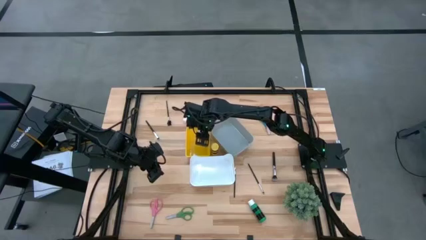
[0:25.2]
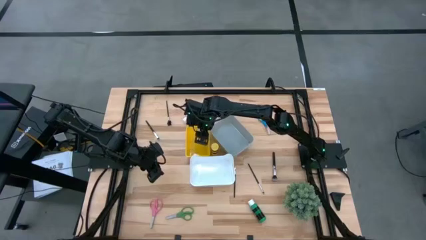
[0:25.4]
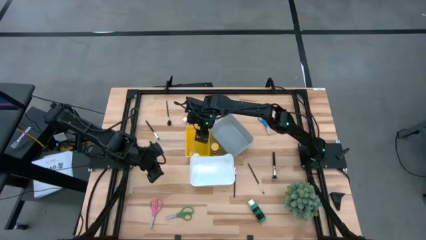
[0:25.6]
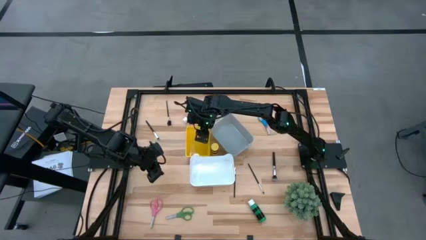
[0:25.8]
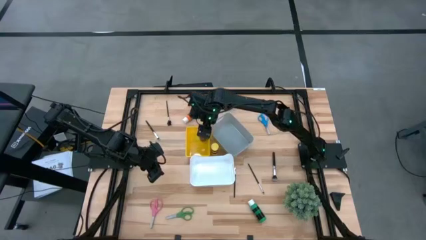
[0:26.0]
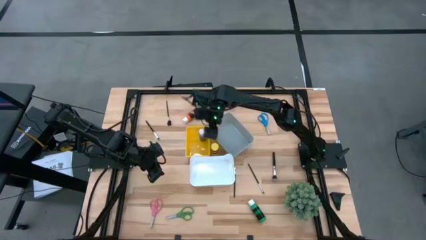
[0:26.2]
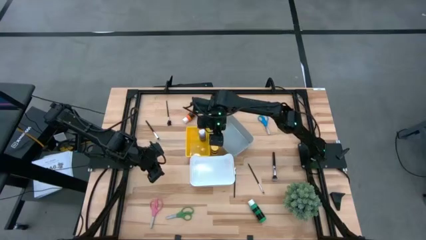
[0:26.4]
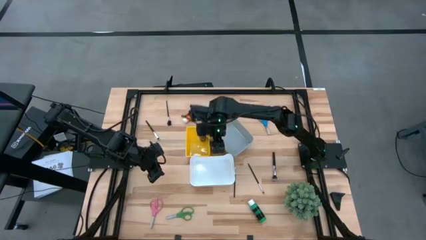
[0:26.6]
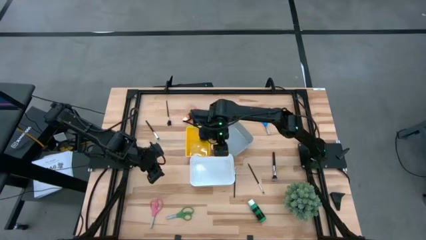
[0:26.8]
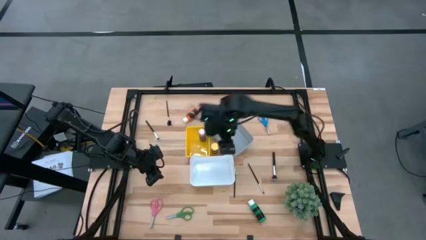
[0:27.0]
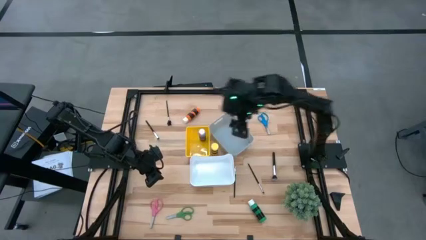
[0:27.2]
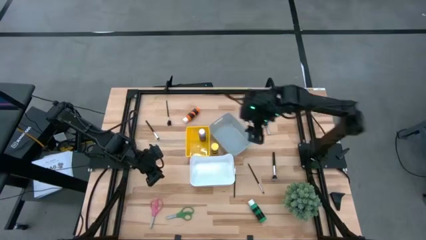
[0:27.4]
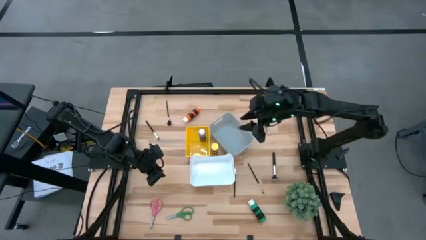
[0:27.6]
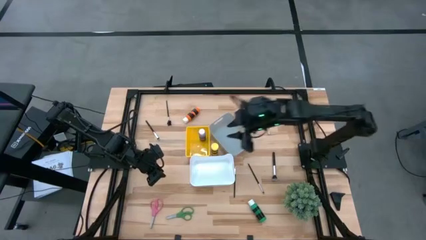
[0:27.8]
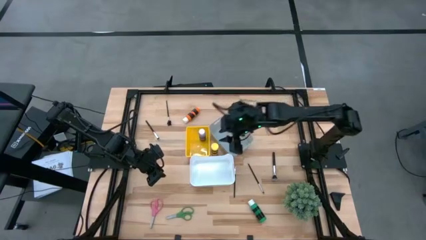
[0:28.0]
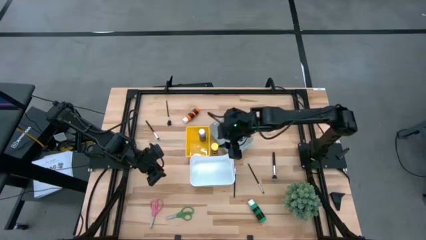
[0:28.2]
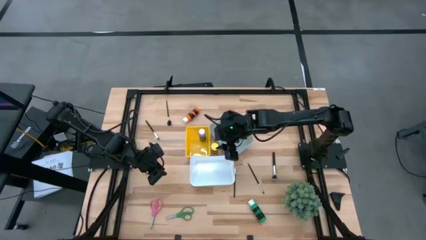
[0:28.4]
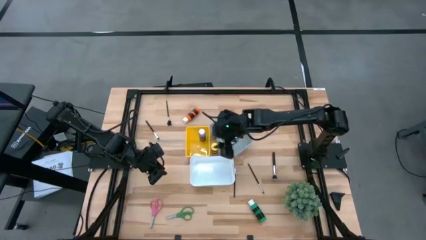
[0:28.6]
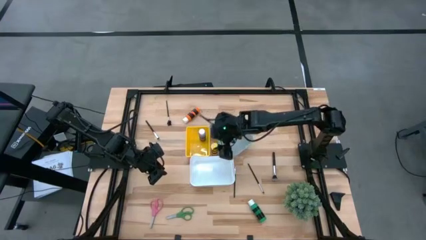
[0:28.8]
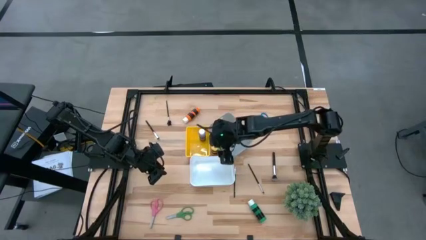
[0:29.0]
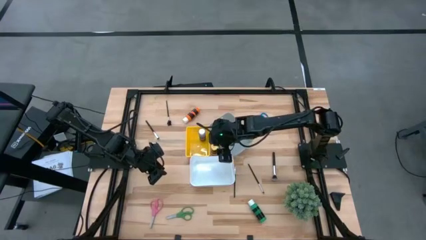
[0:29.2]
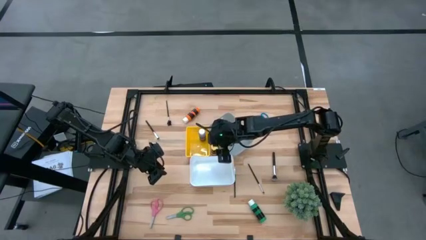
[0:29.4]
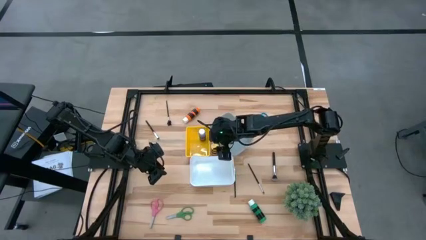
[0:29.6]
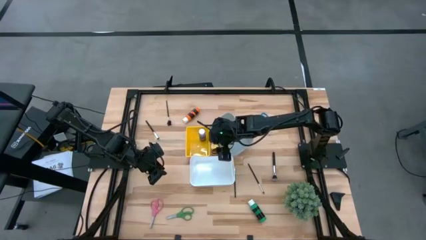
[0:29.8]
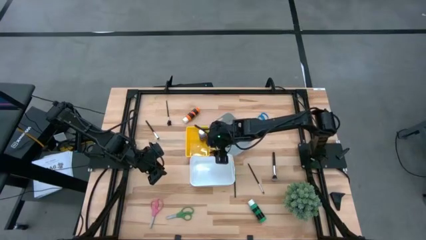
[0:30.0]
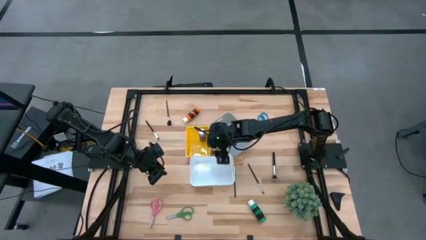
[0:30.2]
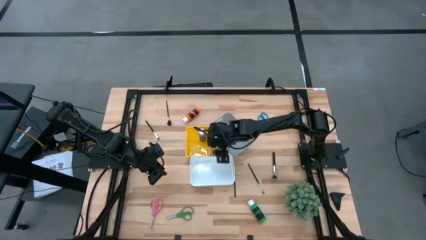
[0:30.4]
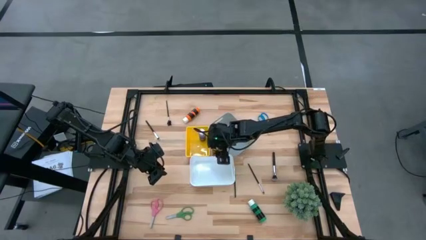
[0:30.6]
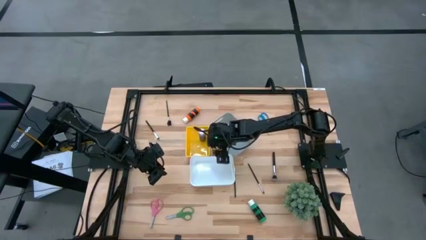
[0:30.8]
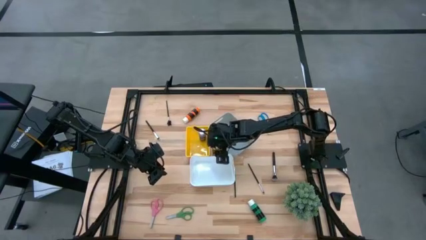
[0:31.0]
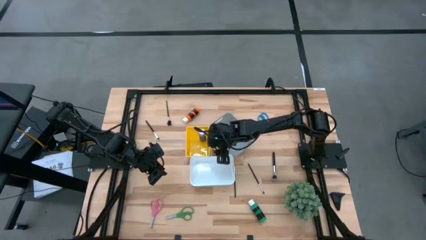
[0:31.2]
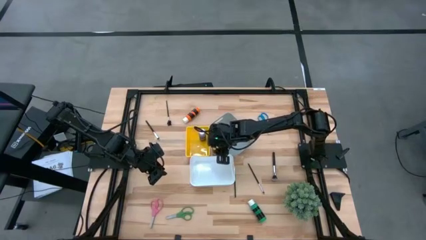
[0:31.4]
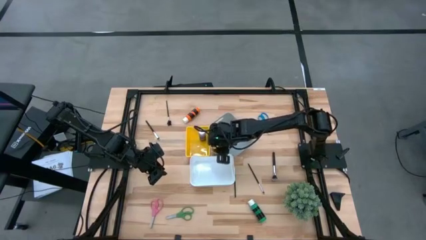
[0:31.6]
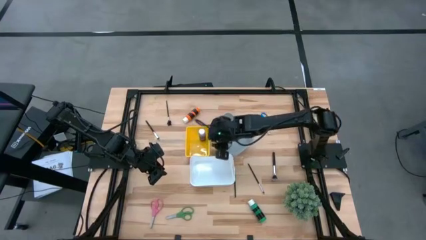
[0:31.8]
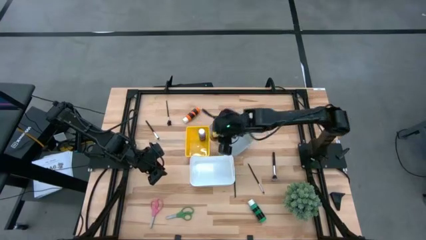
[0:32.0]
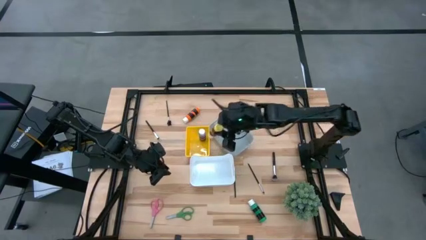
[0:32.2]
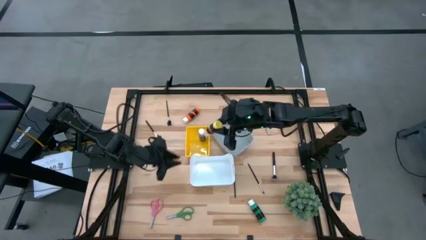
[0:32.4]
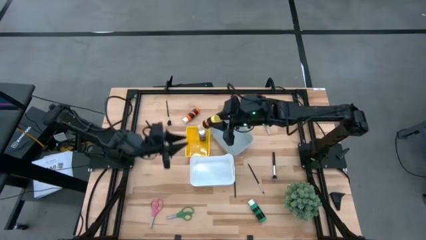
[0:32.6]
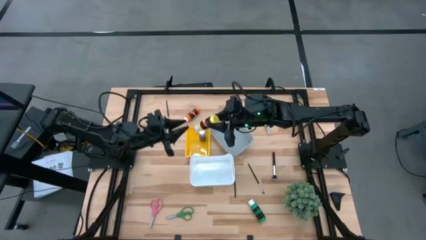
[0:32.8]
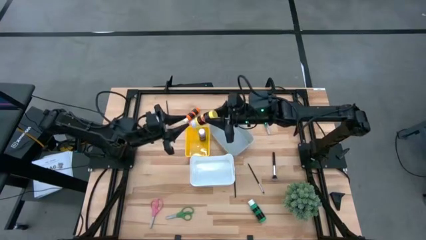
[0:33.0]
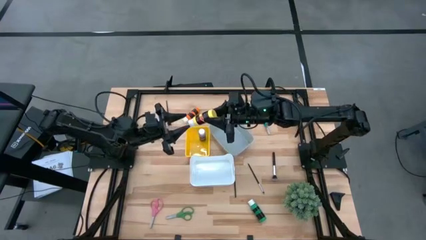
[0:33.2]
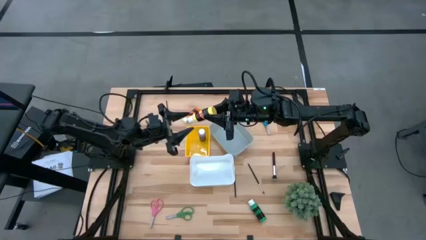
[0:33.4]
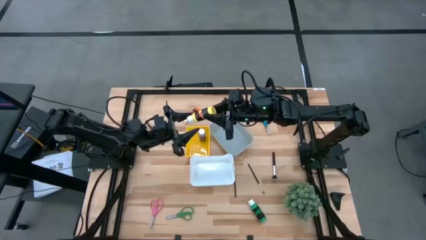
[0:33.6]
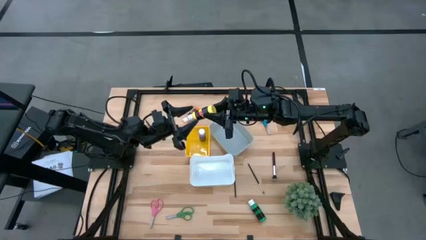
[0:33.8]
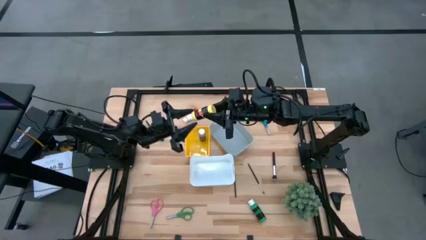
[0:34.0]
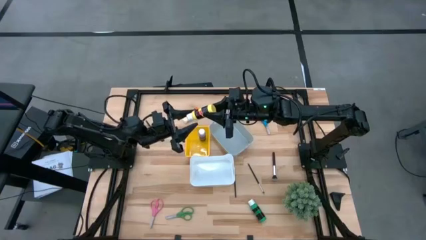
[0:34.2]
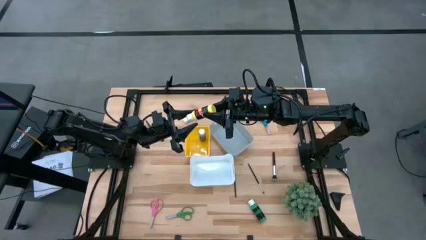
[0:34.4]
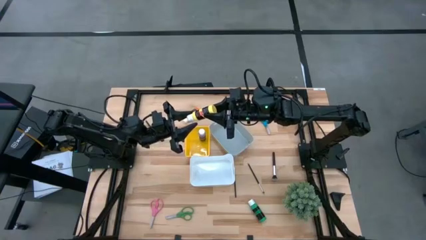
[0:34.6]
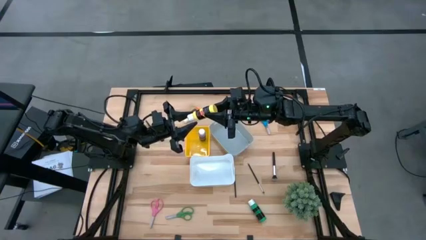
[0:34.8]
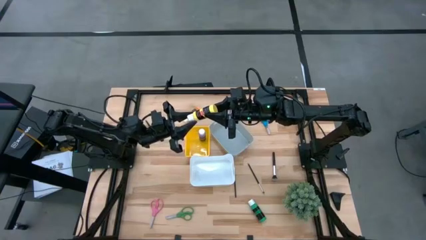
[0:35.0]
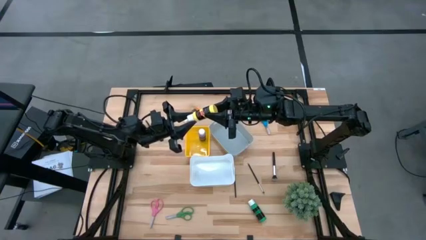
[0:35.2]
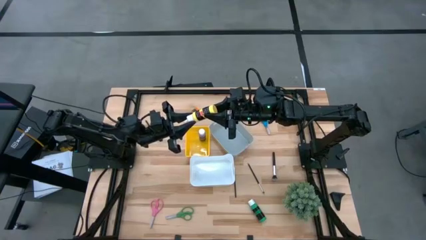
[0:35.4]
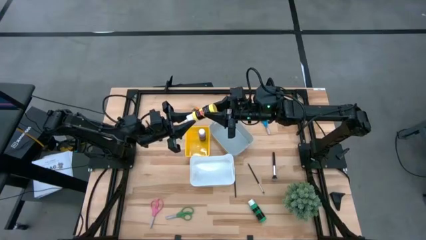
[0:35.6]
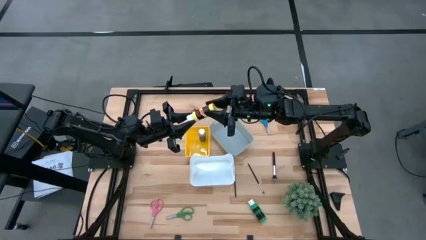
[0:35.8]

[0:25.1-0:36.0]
Task: Pick & Place Paint Supplies
Put the yellow paint bottle into the yellow bin
